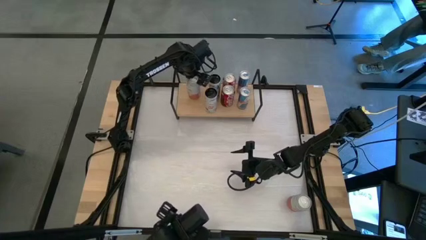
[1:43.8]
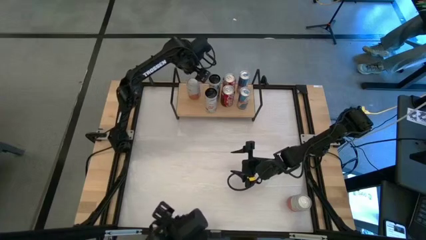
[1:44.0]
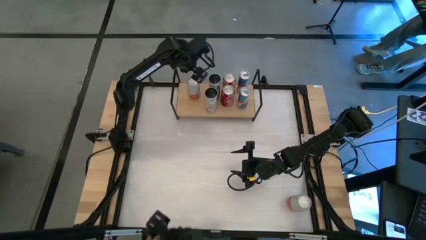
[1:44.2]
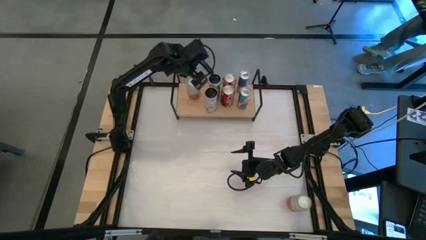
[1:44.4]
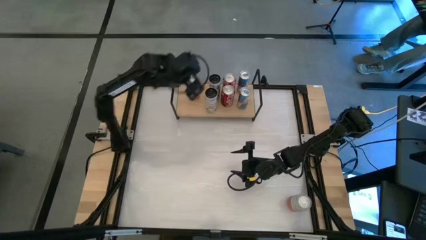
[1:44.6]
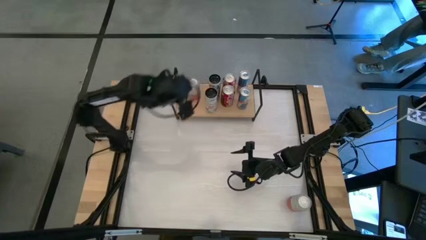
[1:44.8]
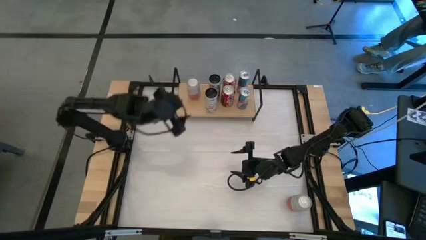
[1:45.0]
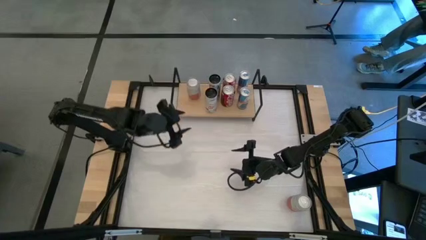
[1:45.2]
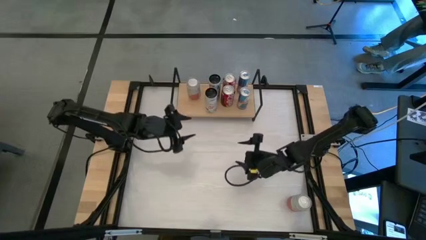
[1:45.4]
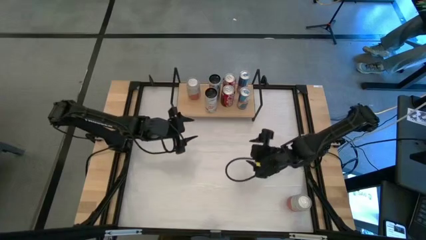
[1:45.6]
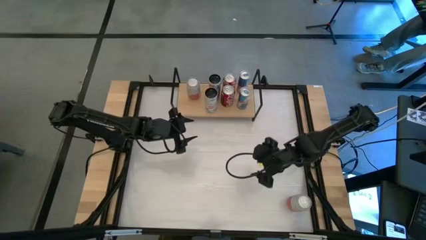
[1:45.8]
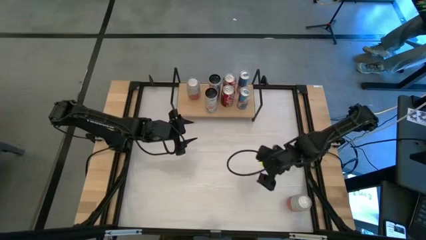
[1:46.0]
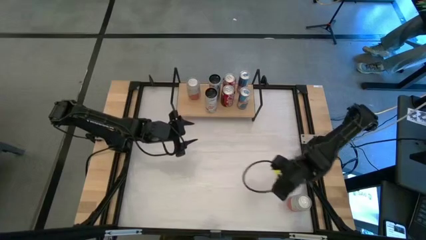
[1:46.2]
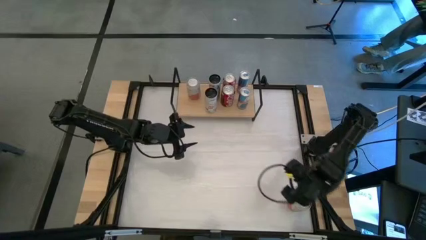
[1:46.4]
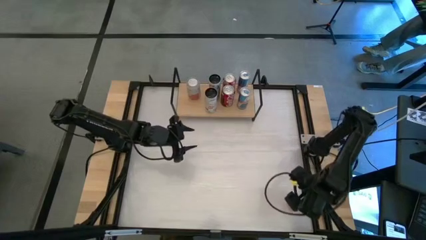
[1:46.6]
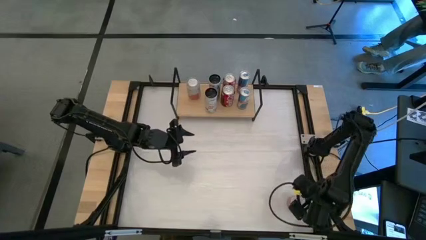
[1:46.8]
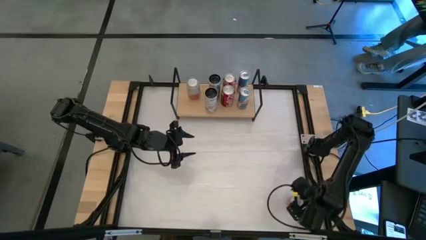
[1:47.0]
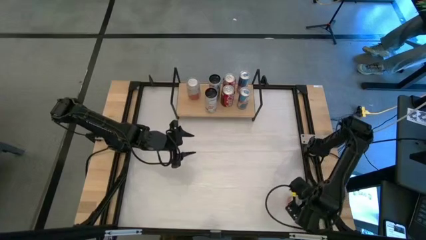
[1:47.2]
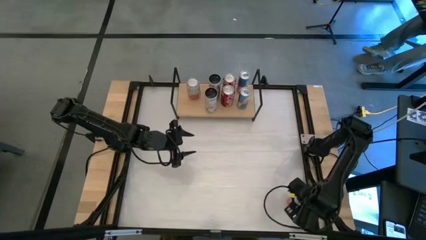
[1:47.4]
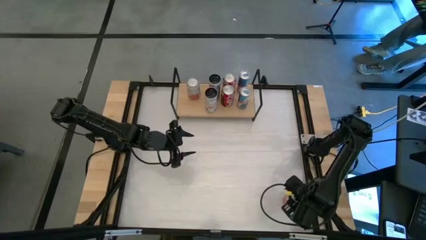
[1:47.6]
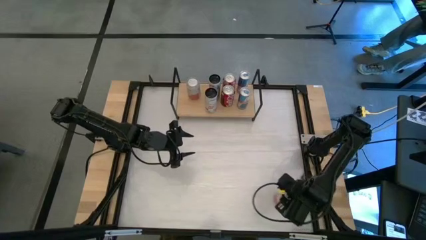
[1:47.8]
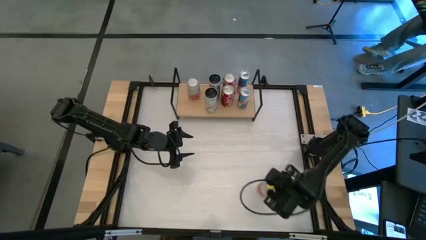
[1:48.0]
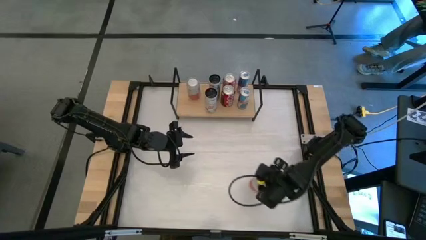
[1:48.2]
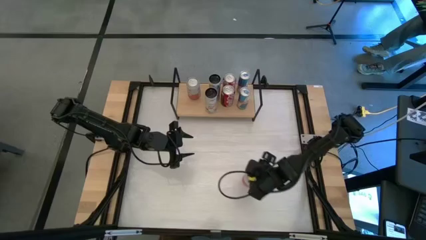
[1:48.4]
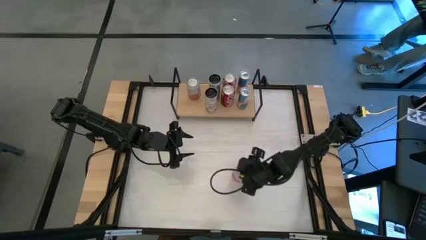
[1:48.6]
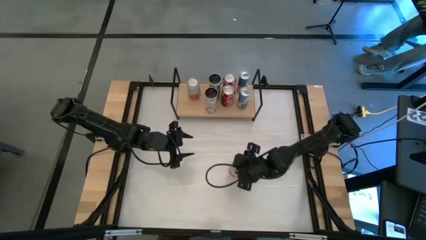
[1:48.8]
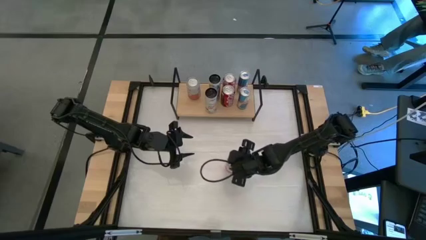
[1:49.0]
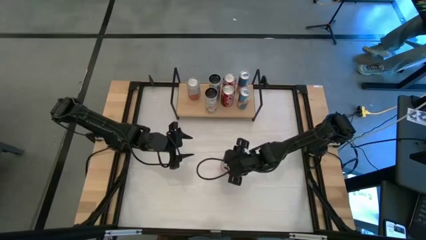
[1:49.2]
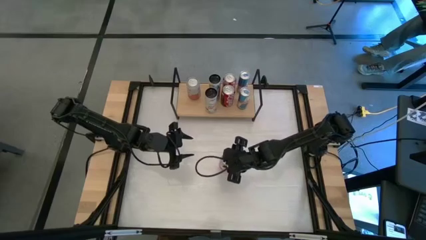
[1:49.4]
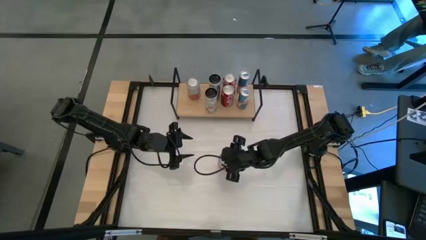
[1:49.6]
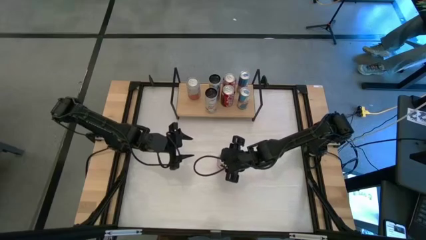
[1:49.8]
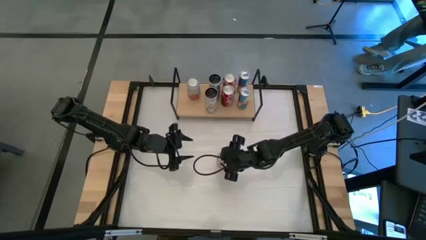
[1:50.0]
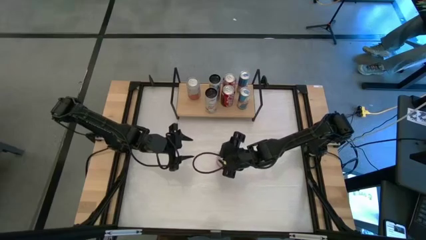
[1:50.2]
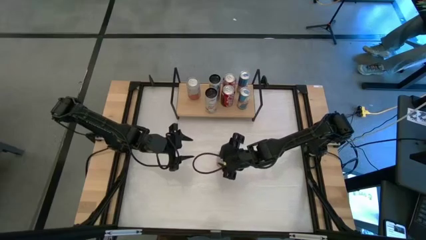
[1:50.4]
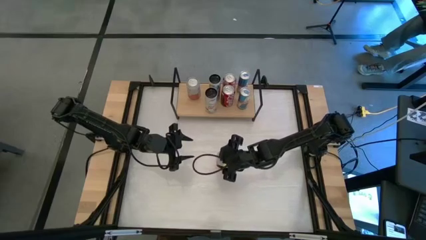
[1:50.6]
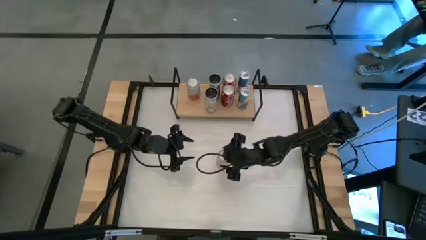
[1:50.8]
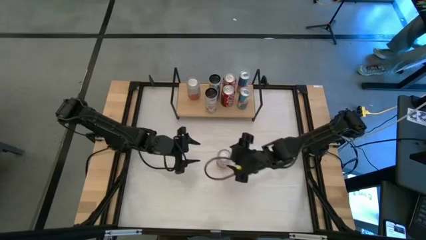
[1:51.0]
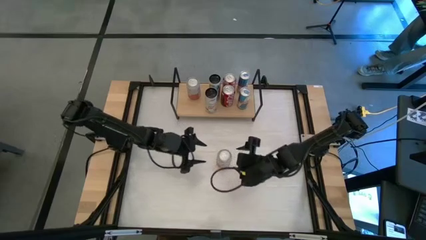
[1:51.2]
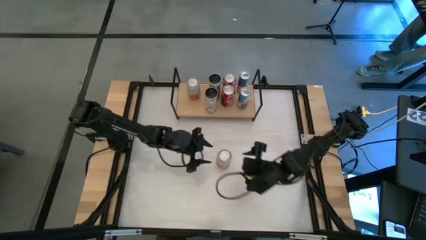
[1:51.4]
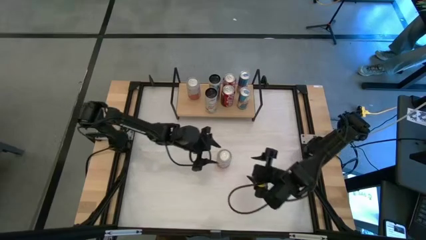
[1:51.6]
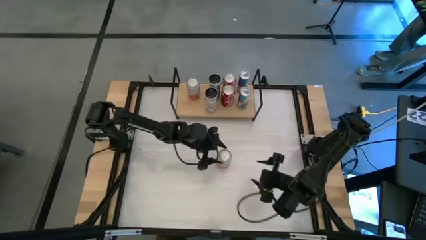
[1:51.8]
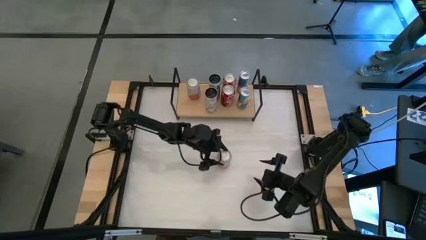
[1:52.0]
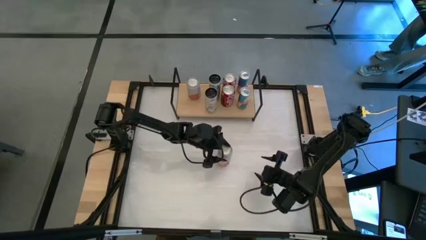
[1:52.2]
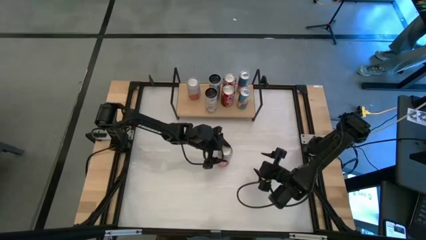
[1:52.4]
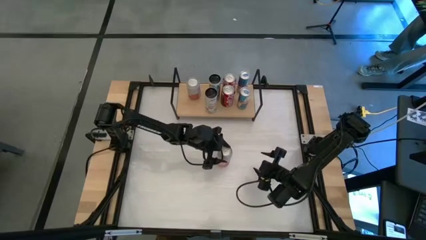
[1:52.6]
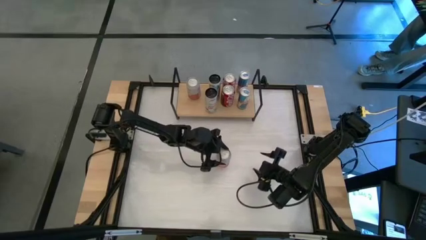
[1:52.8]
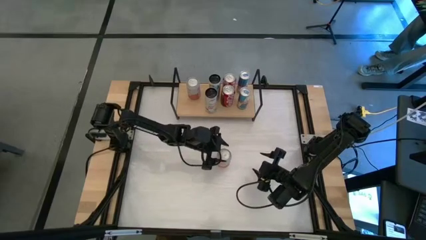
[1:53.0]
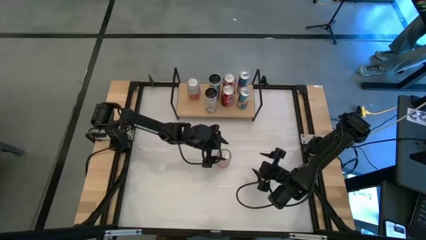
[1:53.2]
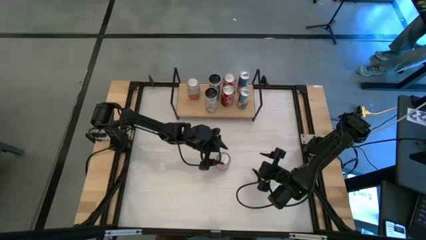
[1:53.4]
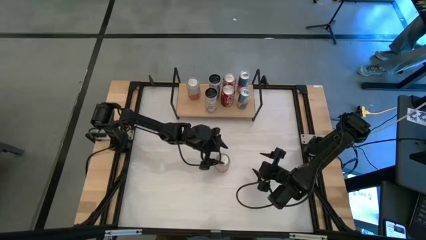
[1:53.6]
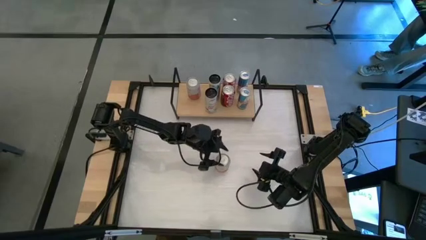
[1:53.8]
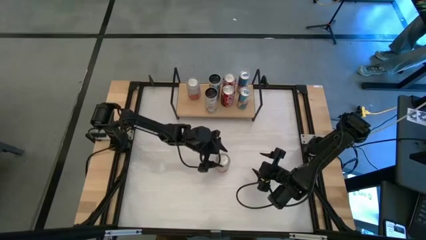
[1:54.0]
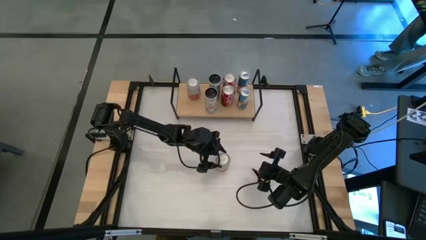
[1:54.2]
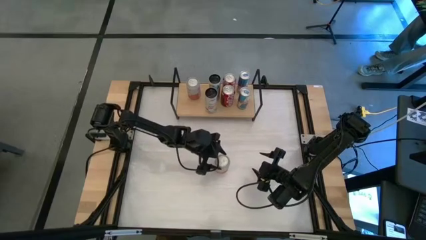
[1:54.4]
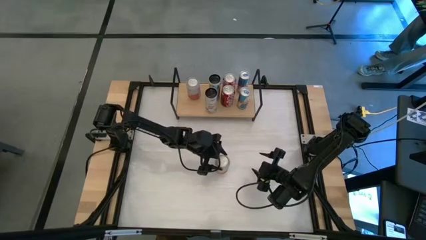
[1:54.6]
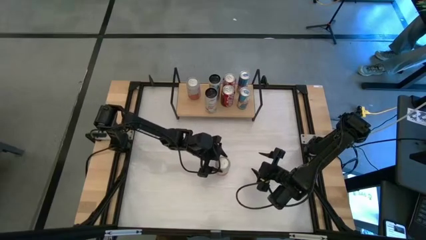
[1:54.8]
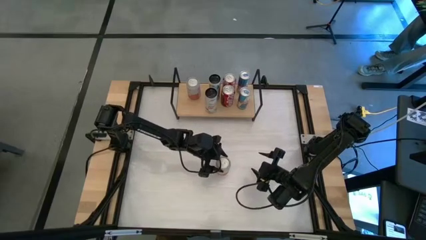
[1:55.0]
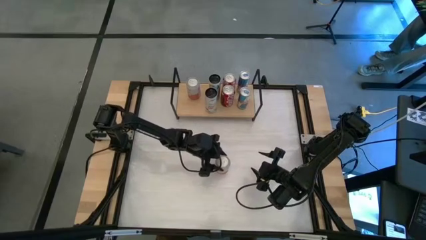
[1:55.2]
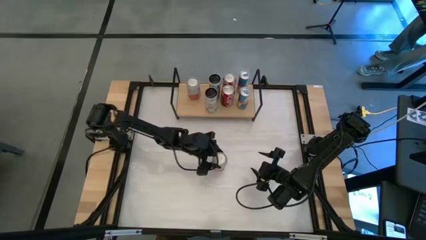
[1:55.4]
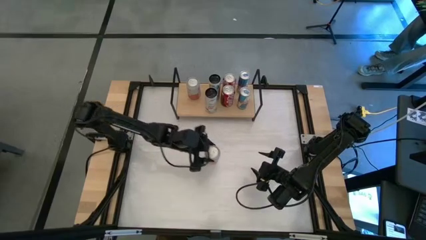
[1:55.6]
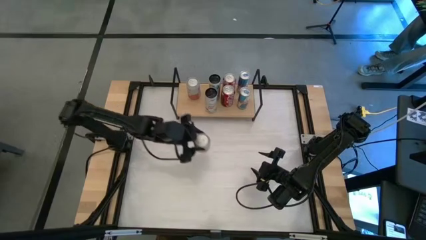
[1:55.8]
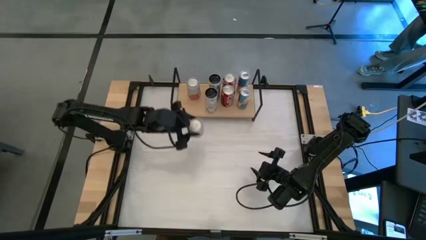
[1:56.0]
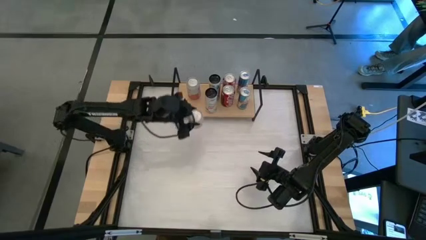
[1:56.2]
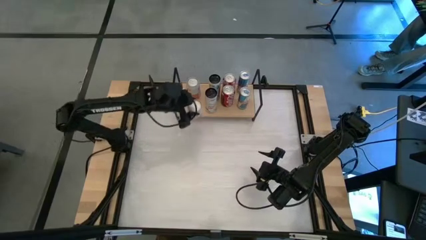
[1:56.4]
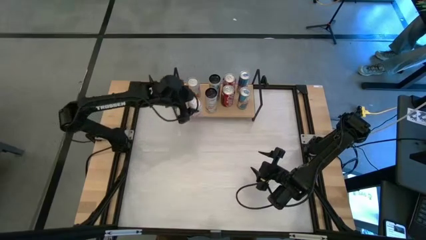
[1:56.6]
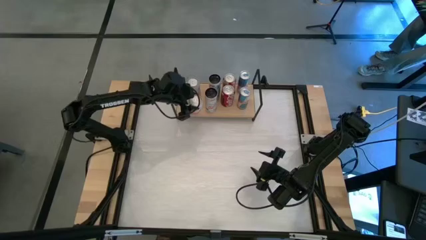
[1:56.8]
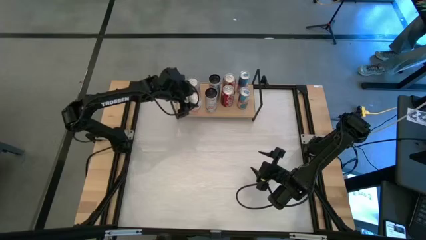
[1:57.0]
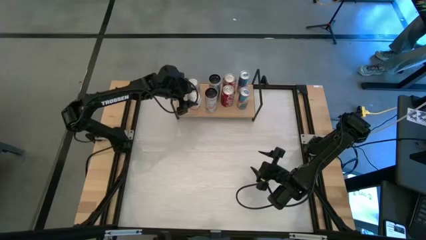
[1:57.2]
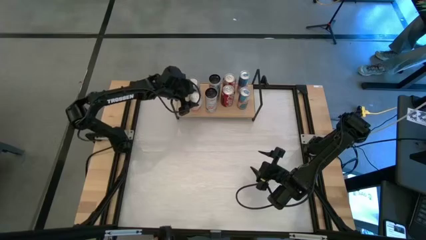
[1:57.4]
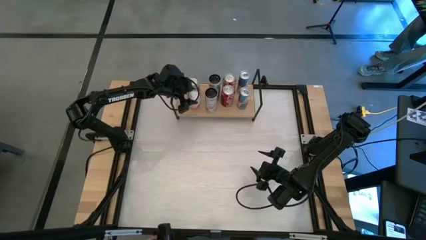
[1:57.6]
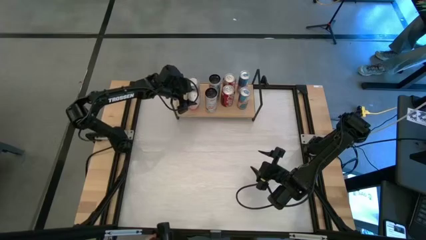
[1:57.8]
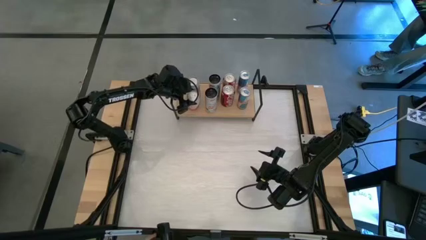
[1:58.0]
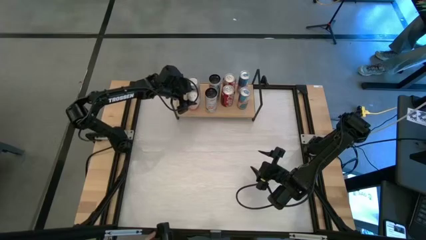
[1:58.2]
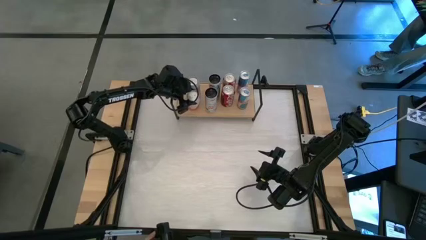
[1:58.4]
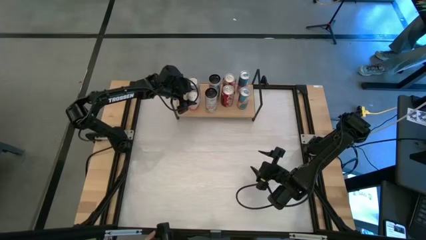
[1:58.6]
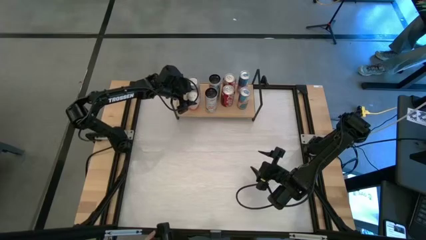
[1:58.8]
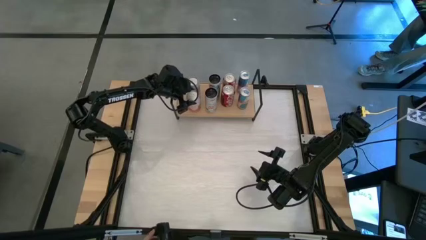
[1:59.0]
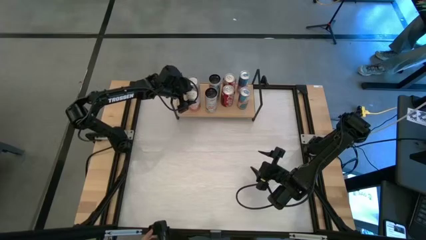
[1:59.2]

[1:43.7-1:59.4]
Task: Place canned beverage on shelf
Put the white soda can on the shelf
